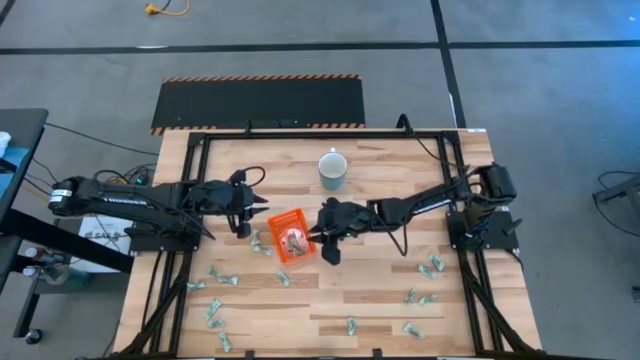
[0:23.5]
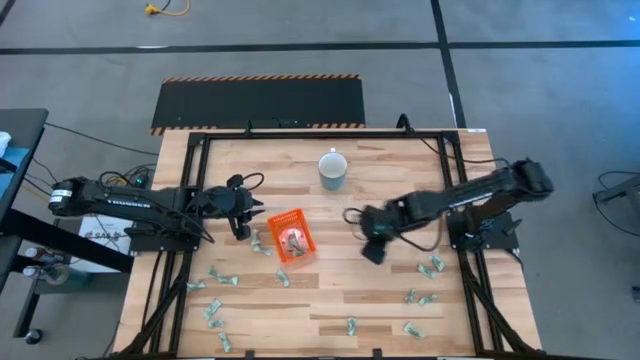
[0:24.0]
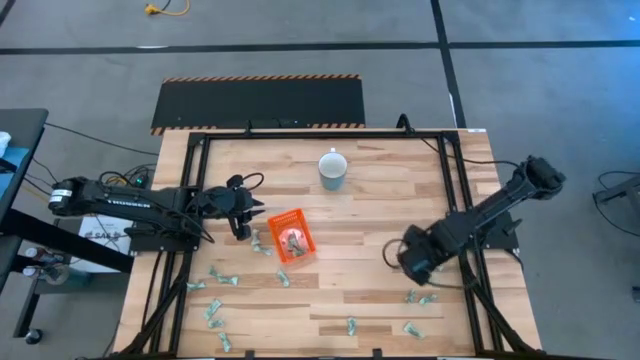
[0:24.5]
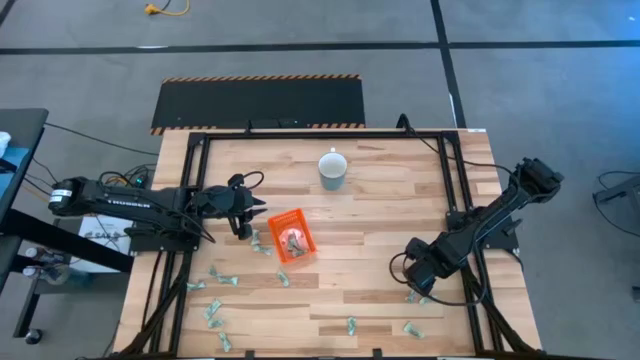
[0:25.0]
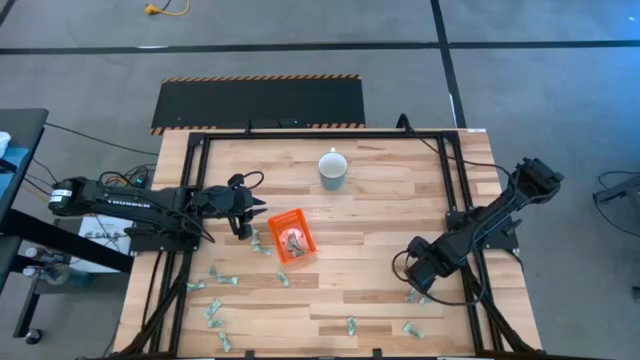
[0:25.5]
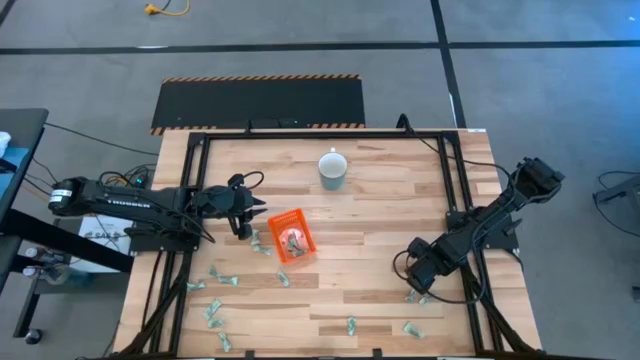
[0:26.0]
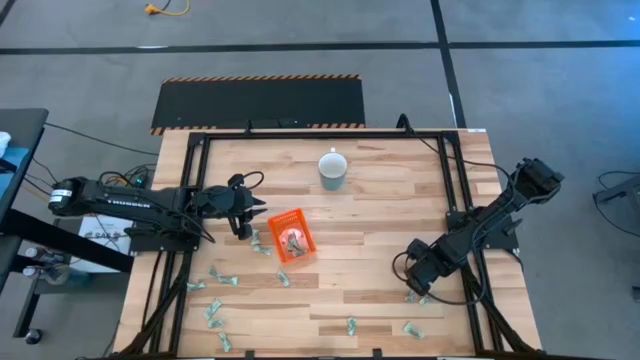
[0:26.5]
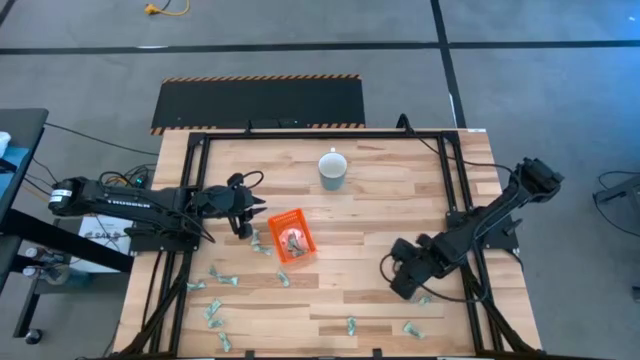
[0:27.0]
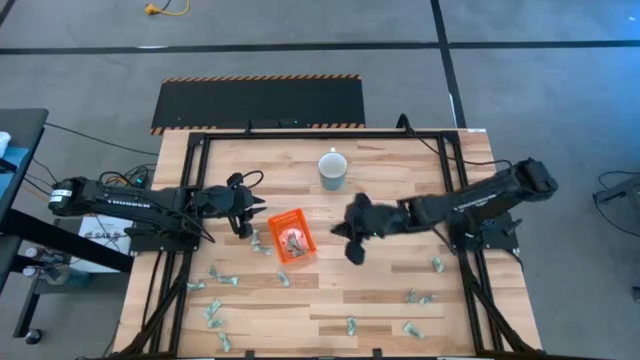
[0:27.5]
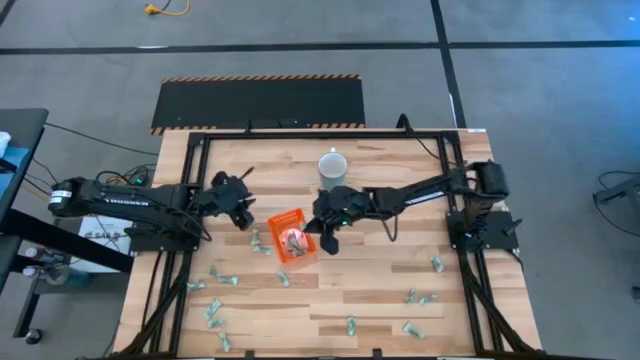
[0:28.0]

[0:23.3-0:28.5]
Task: Pick and place items into bin
Put the green stevia packet into the orange bin

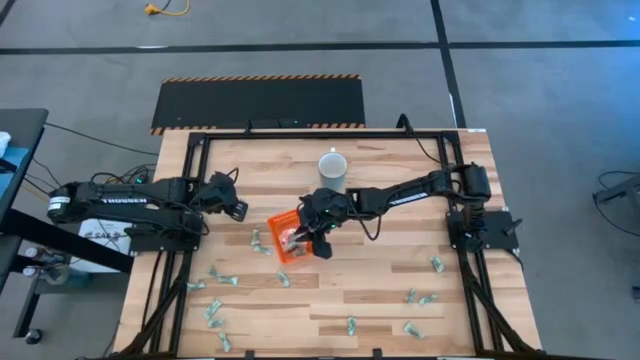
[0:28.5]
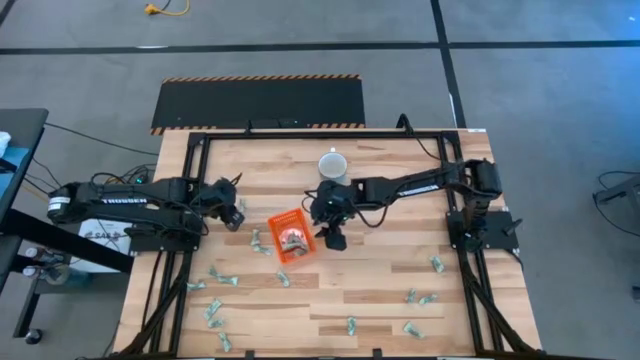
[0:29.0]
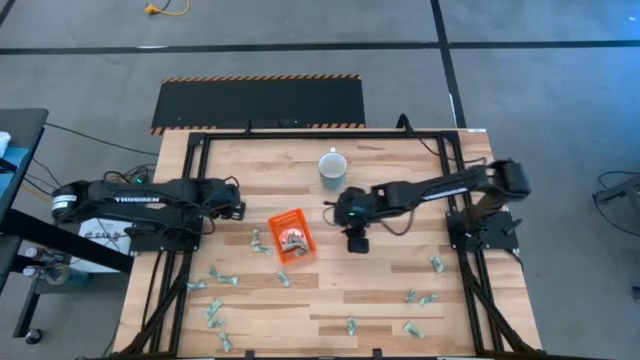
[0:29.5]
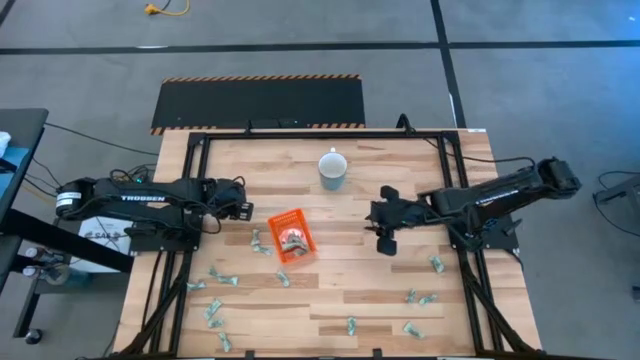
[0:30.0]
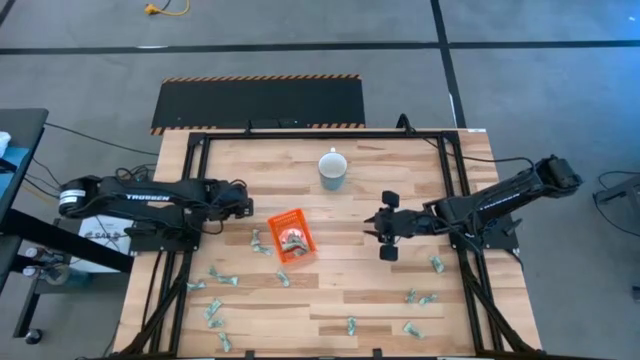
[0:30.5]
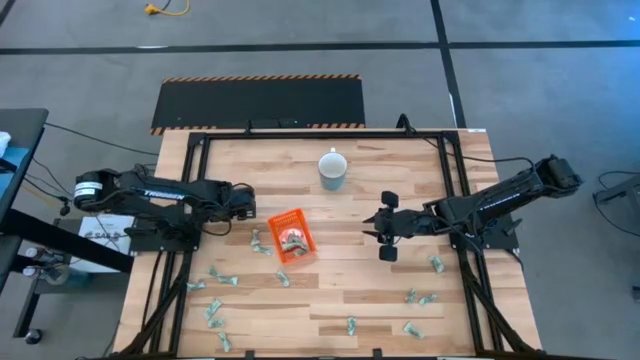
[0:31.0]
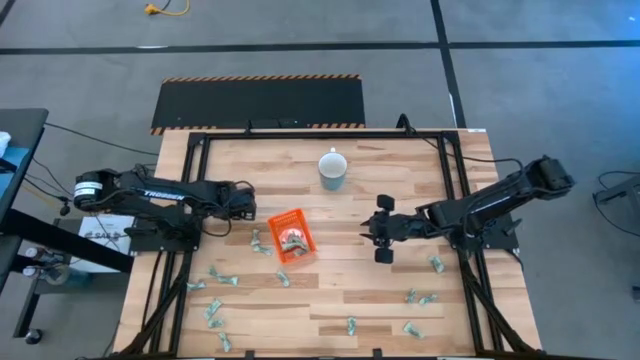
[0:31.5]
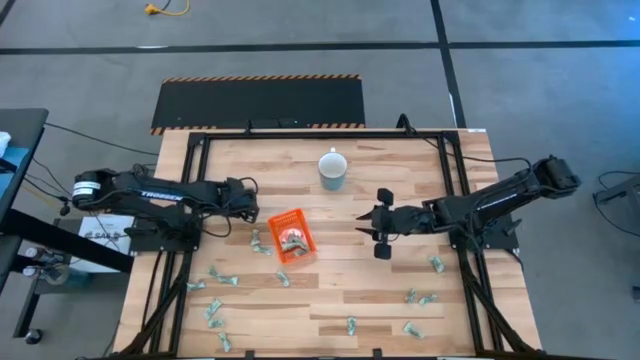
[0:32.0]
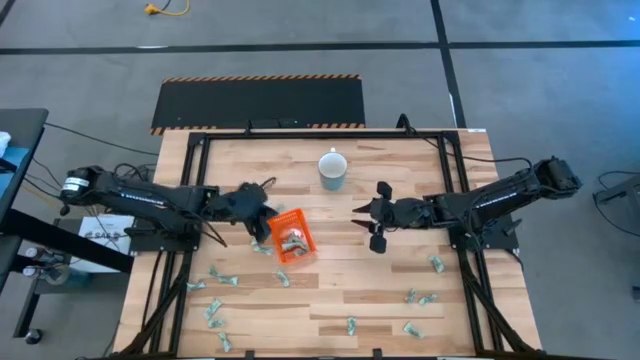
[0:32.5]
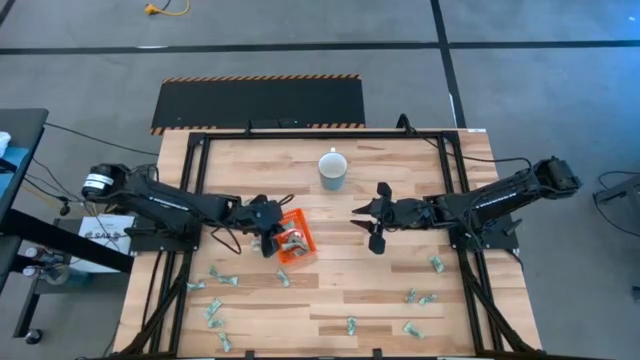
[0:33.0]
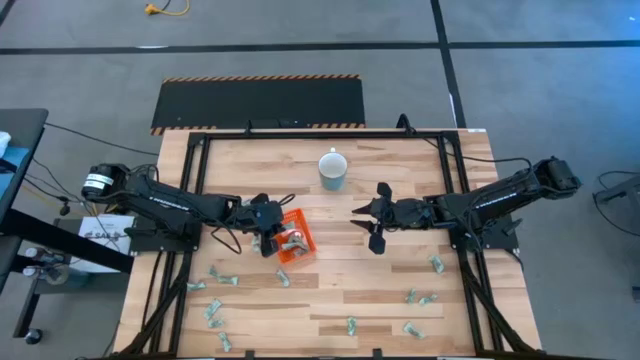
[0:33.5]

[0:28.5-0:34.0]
Put the green stevia packet into the orange bin

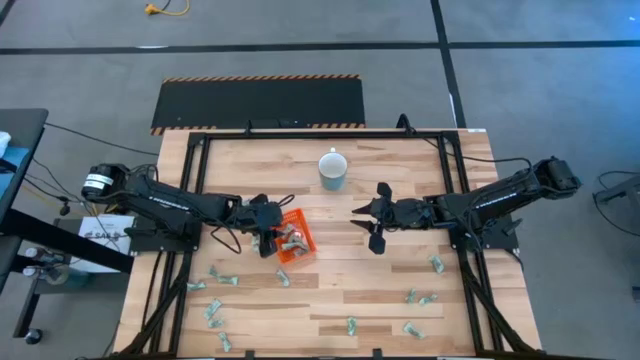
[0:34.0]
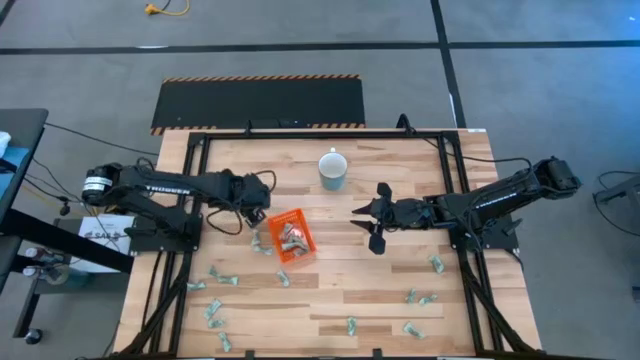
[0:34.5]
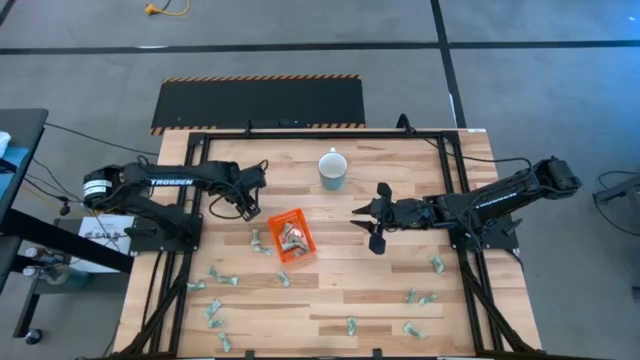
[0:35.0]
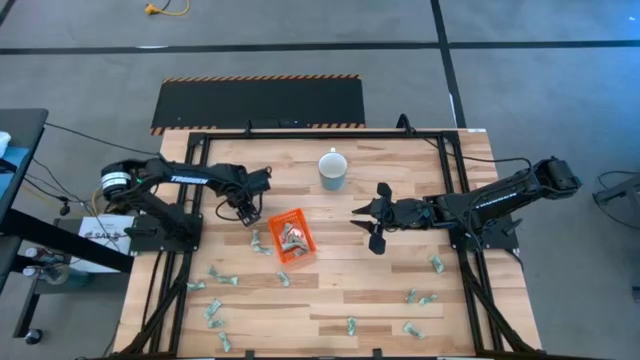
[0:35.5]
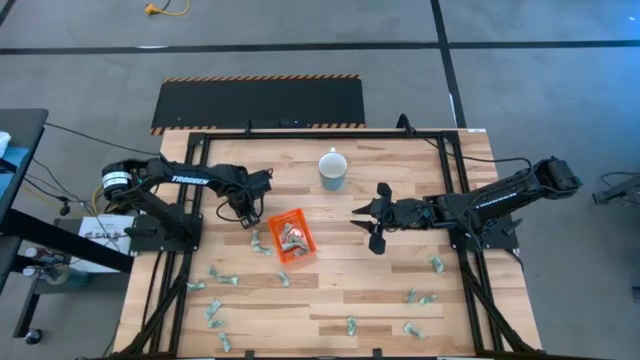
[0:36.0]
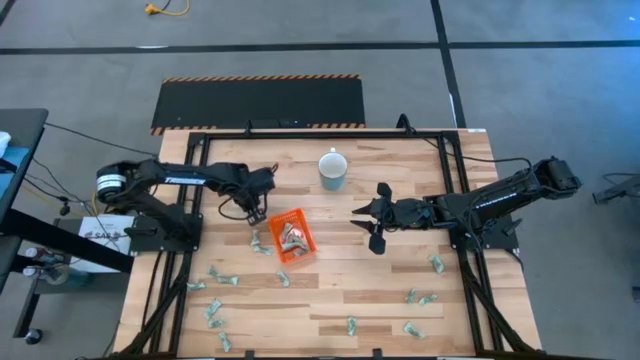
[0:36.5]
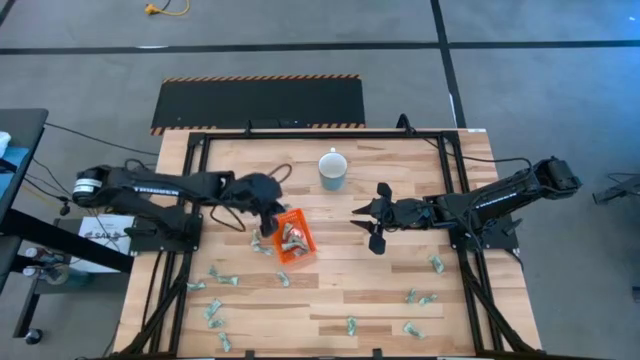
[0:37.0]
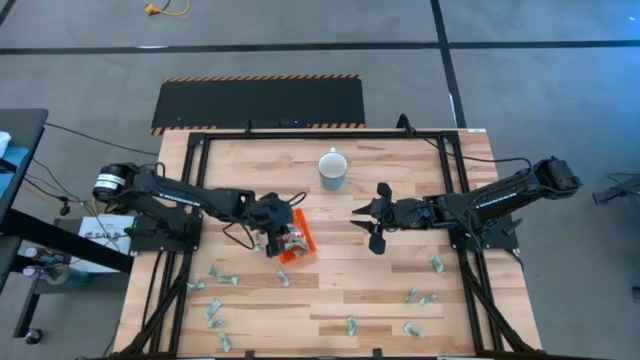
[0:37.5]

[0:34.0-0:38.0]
Put the green stevia packet into the orange bin

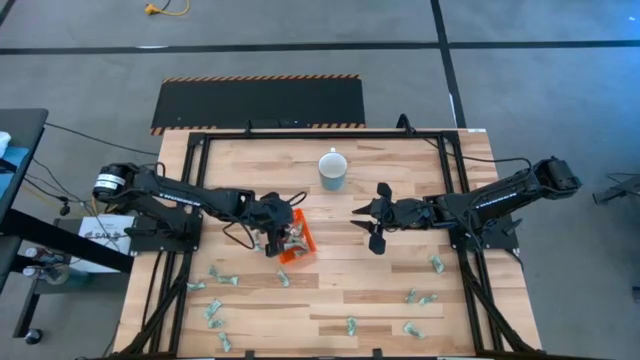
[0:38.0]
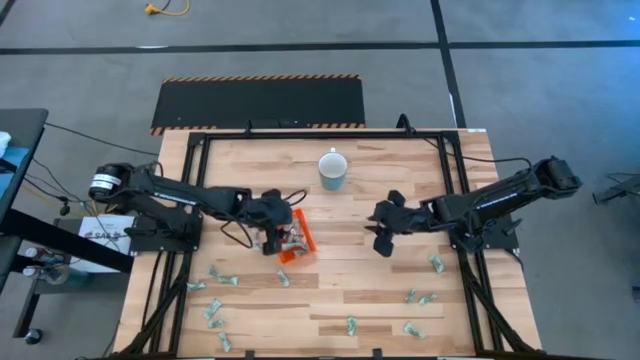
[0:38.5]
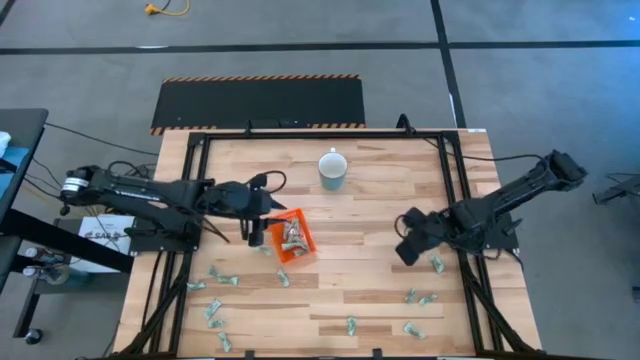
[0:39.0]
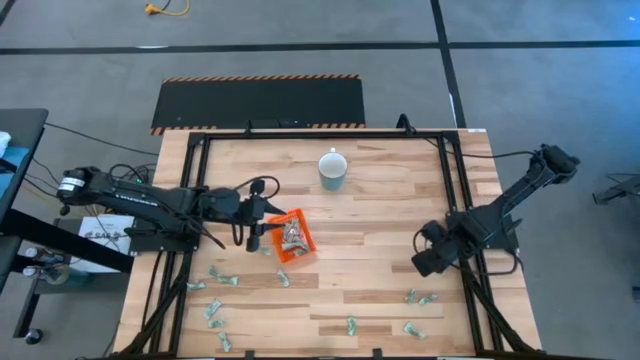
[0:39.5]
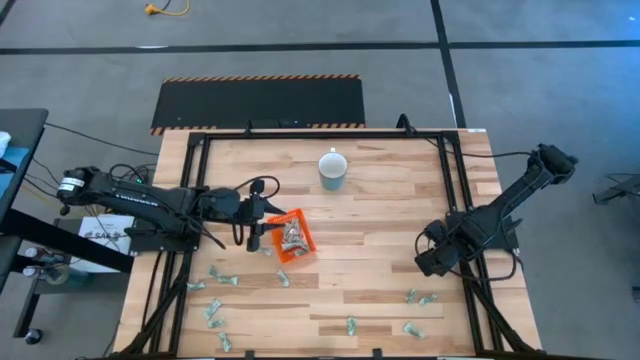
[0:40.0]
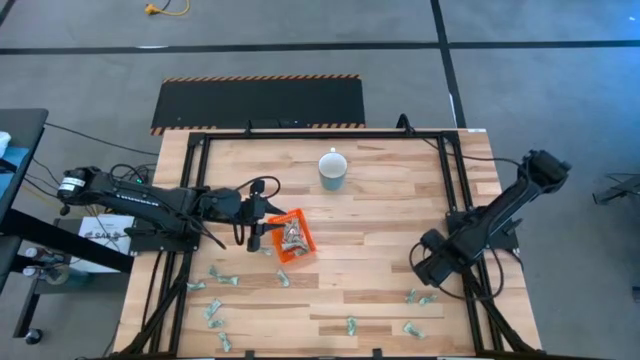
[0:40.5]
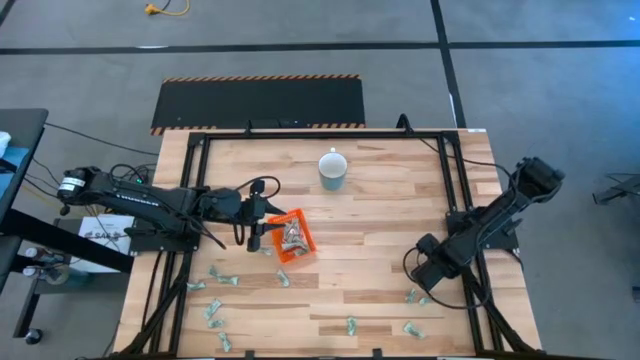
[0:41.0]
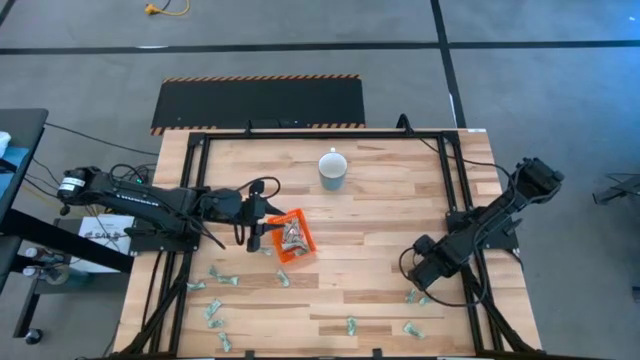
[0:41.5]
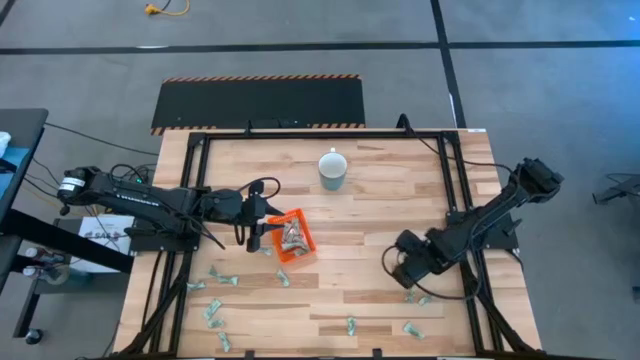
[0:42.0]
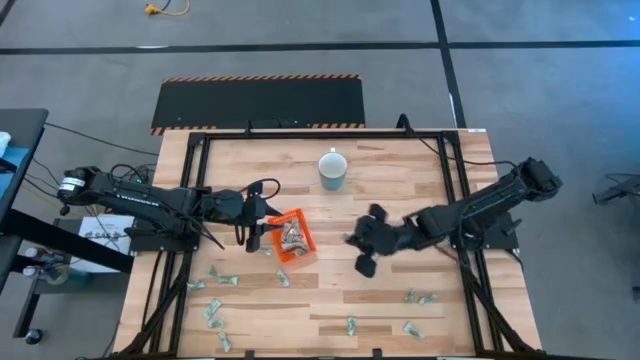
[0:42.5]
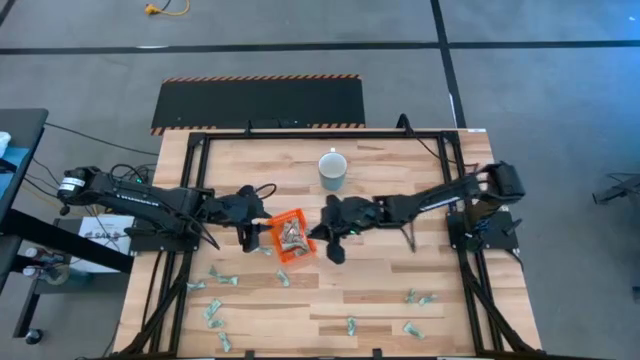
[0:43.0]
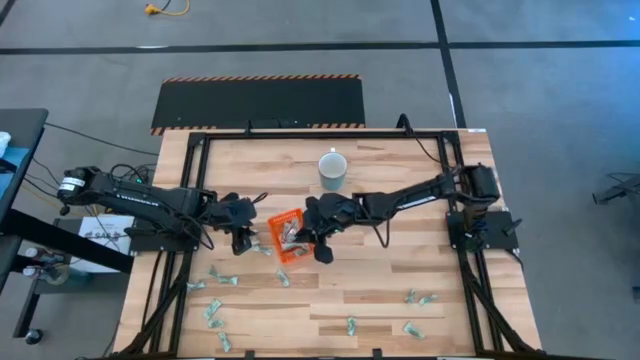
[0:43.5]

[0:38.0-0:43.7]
Put the green stevia packet into the orange bin
